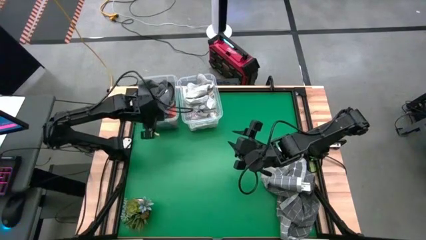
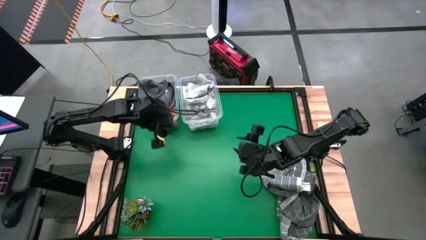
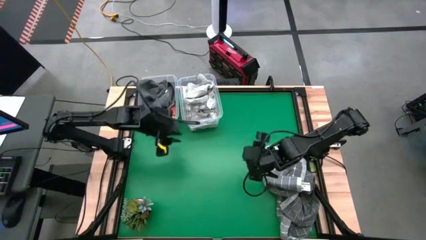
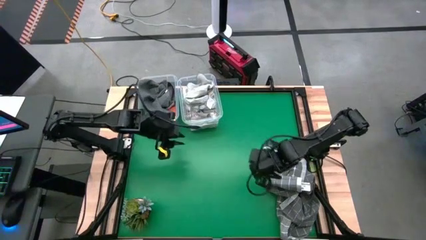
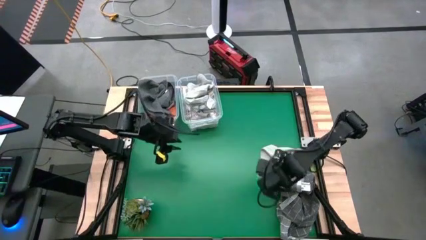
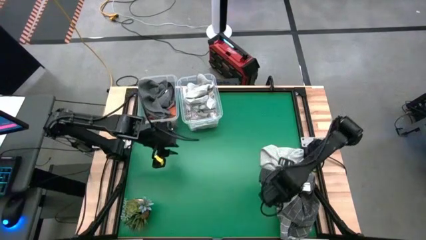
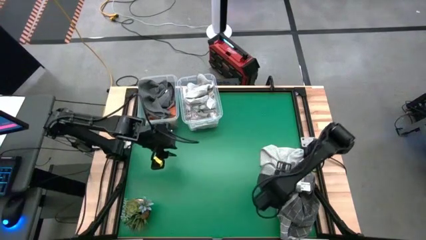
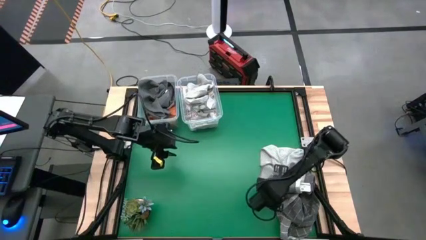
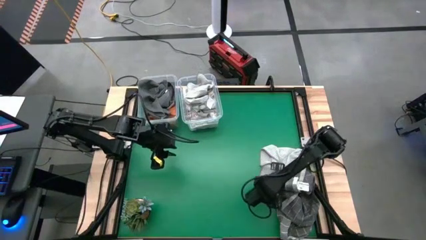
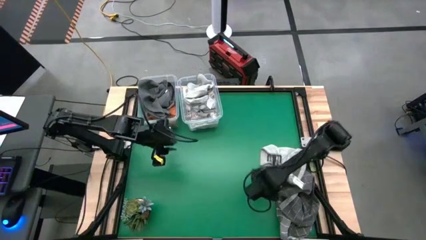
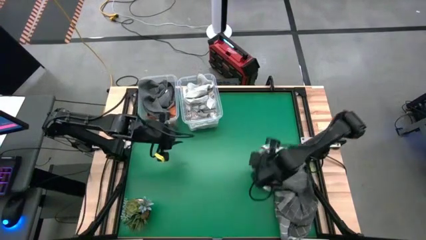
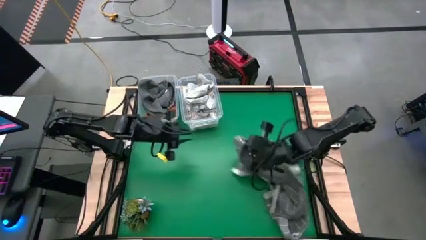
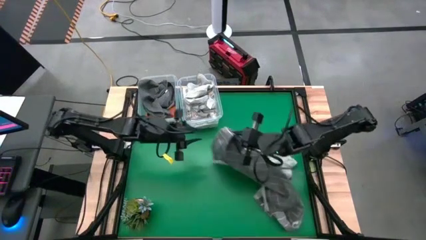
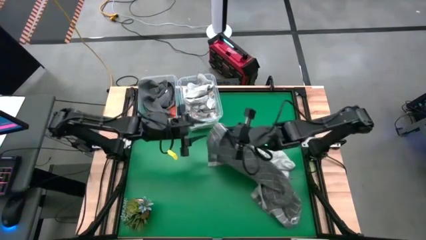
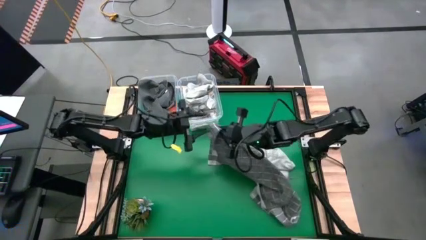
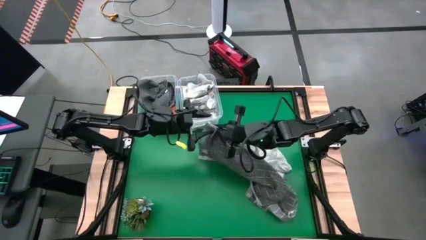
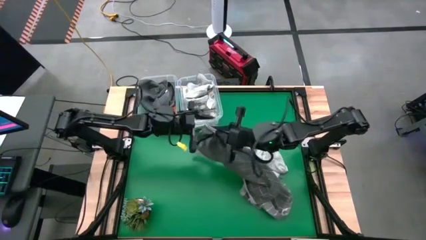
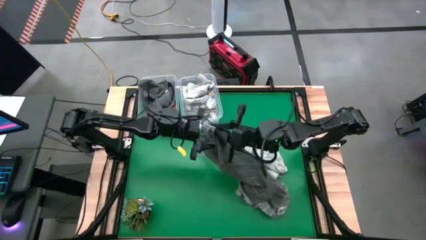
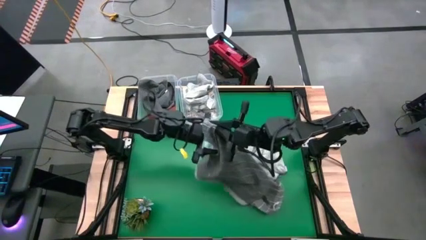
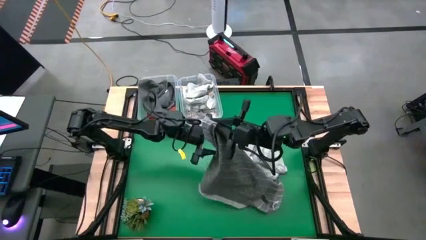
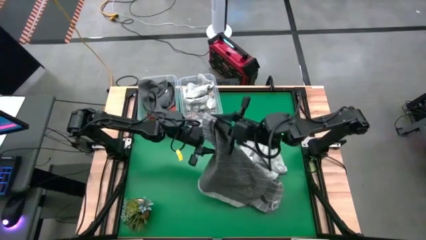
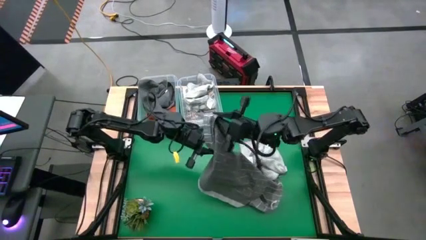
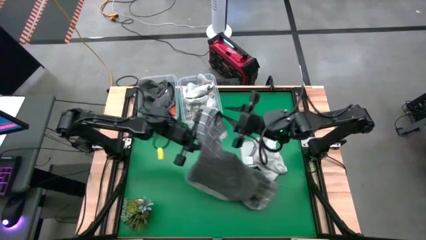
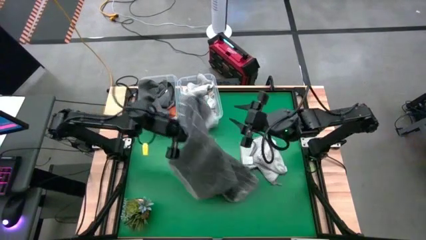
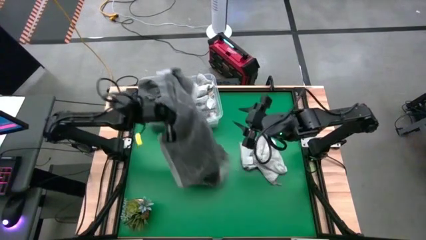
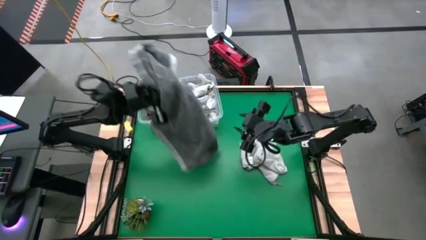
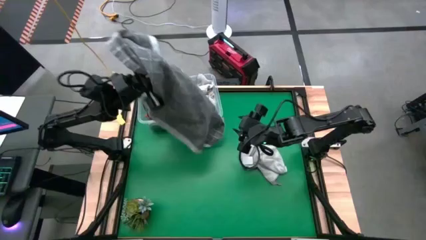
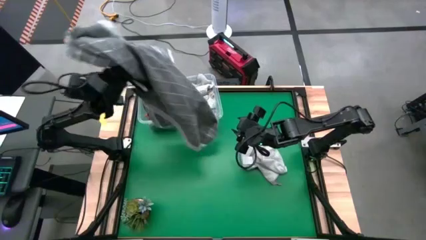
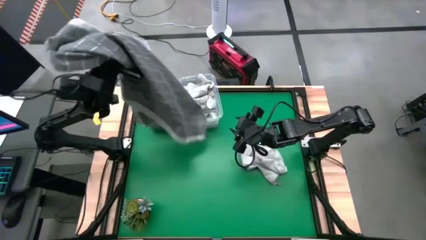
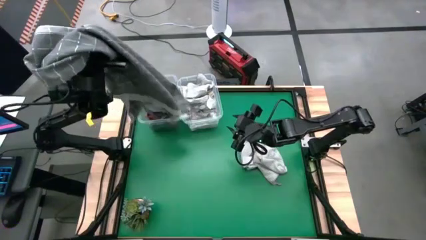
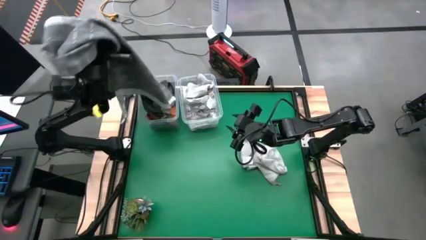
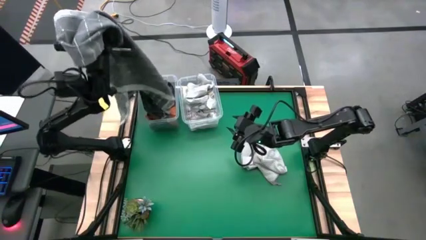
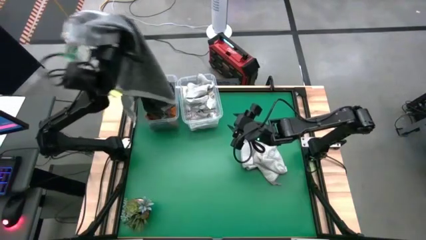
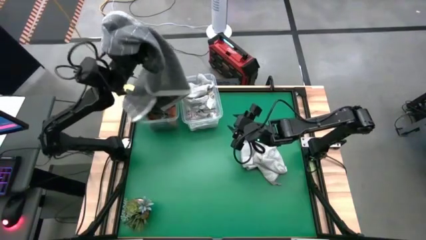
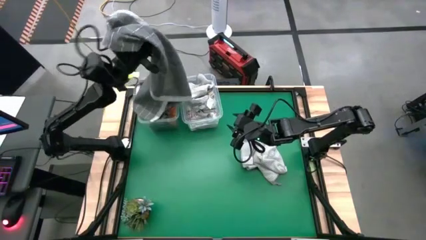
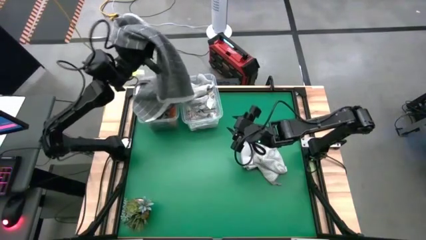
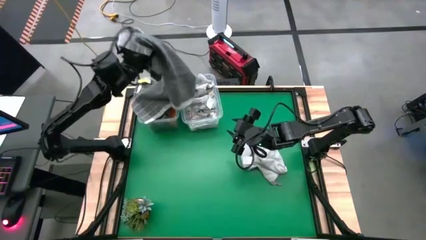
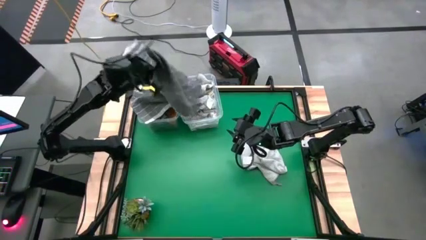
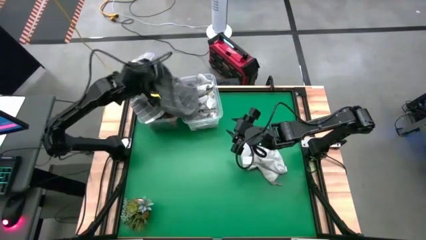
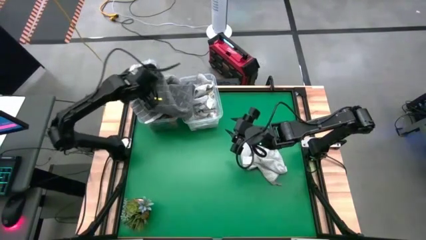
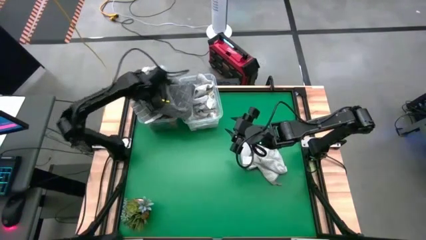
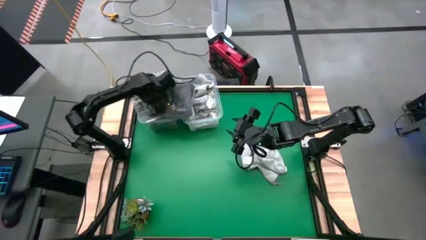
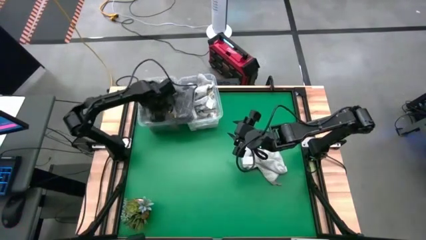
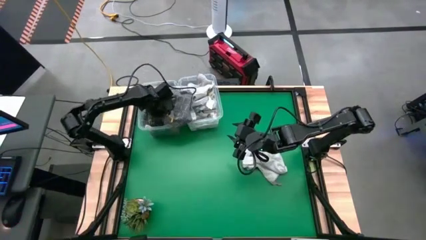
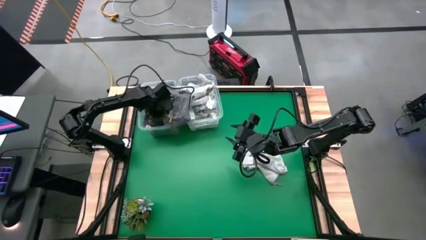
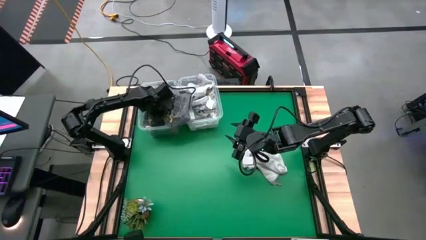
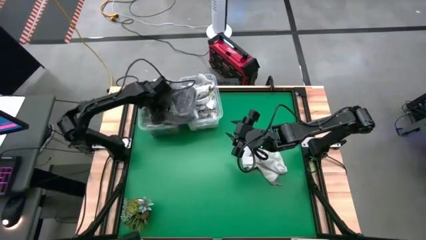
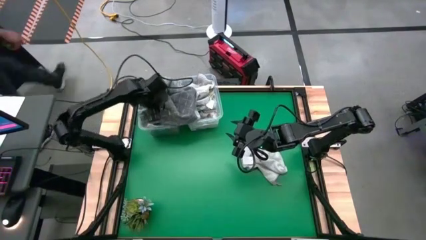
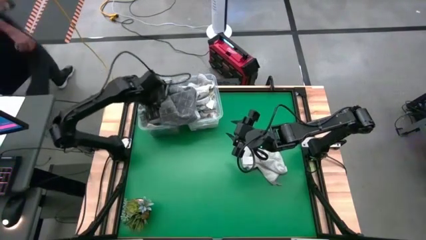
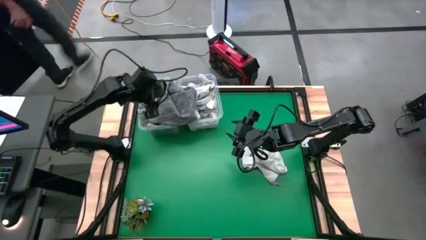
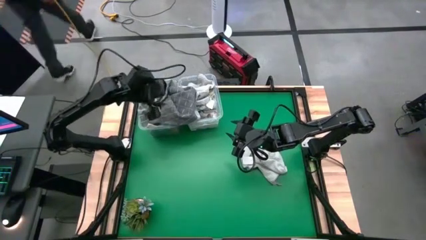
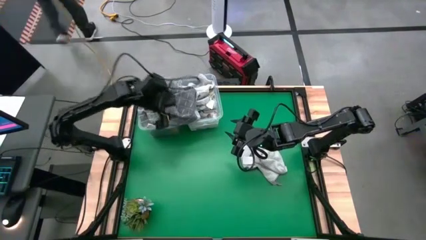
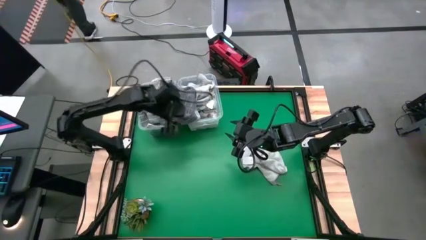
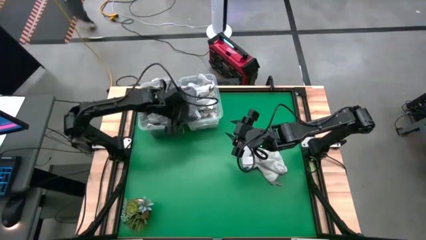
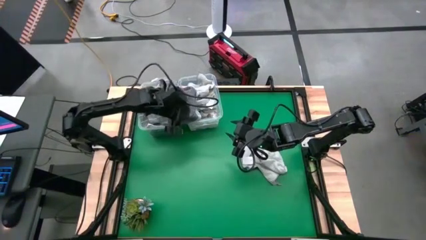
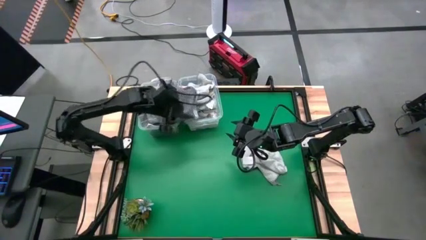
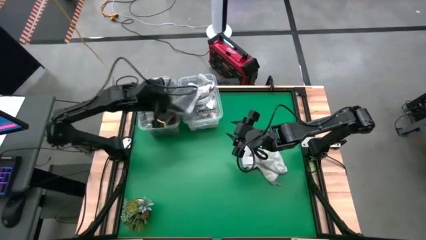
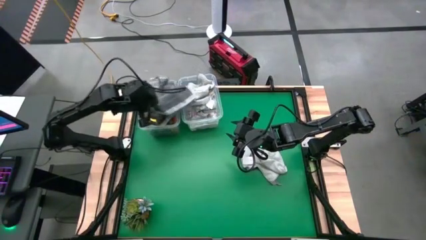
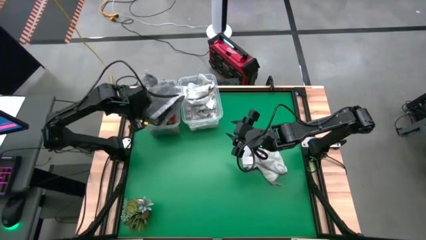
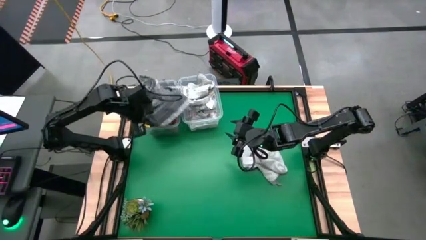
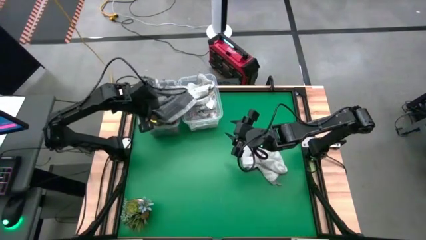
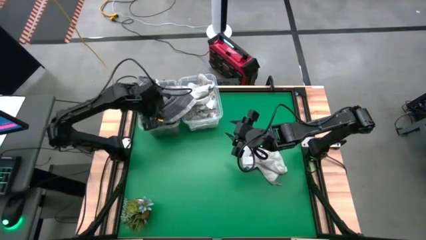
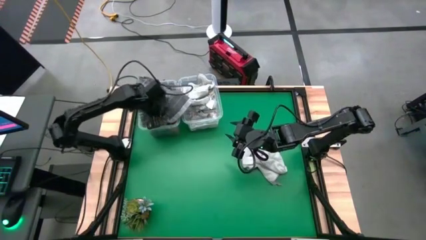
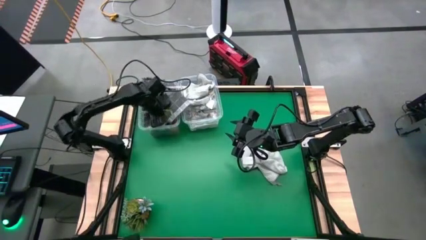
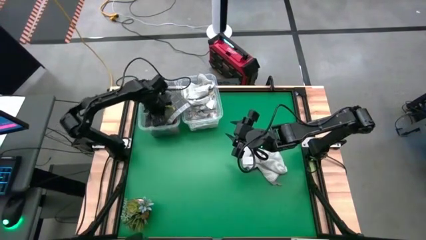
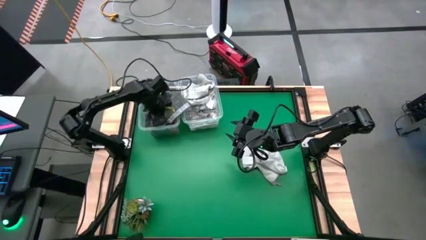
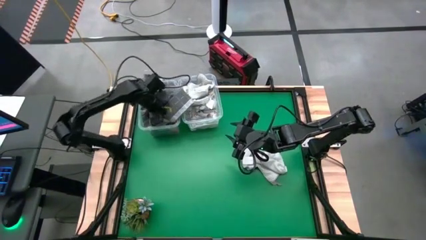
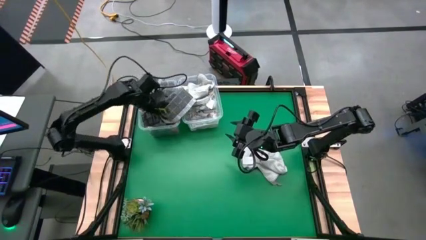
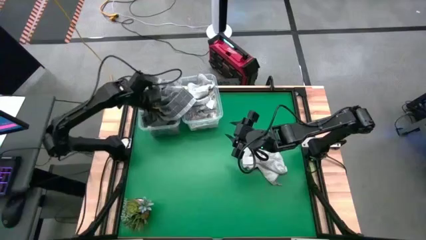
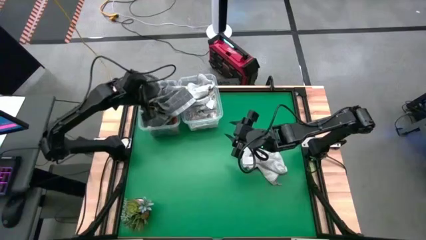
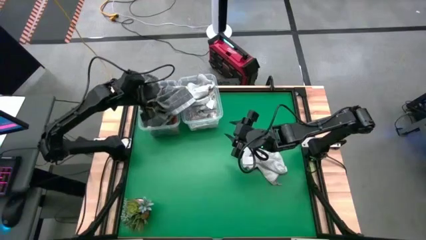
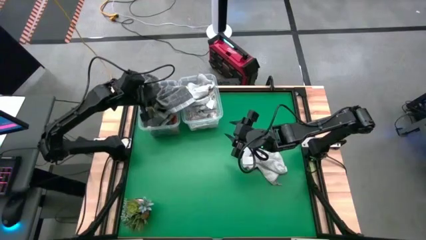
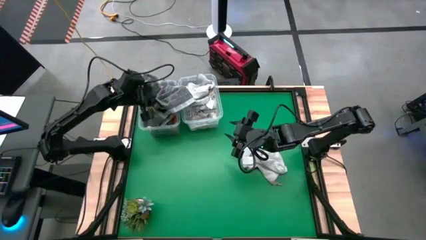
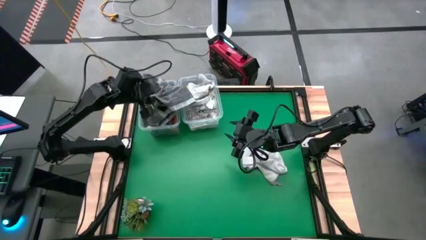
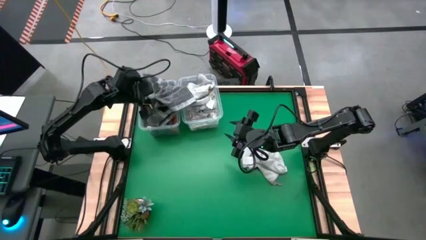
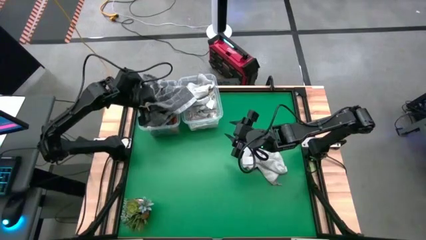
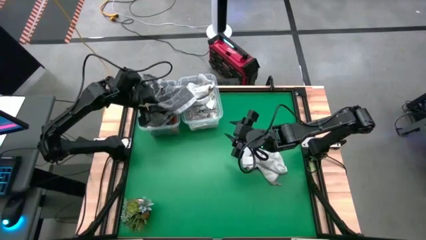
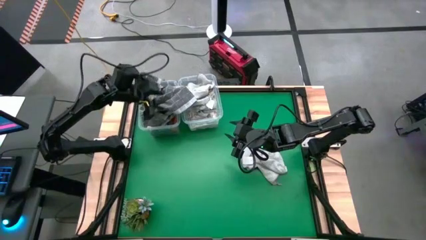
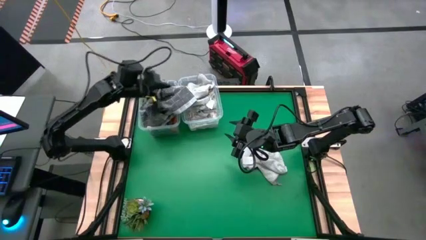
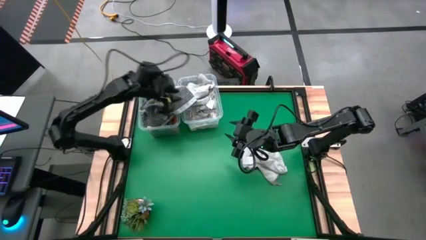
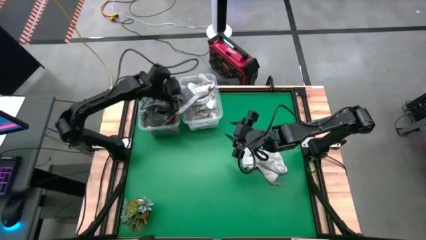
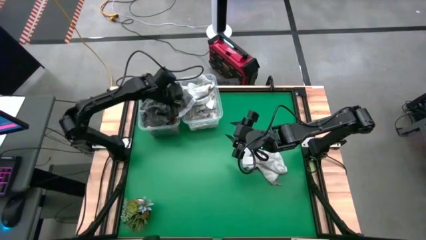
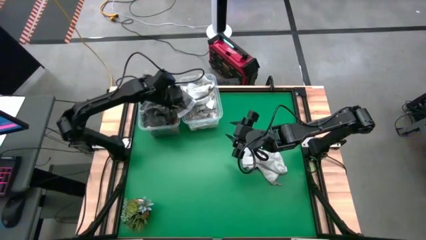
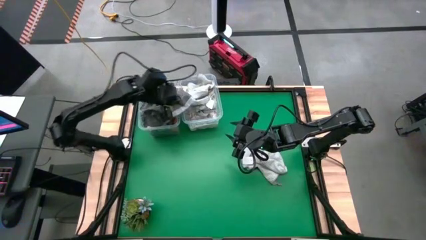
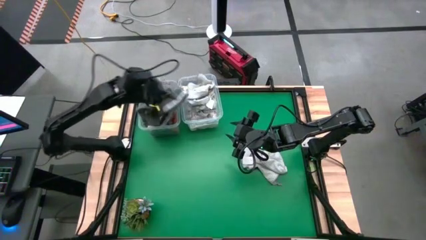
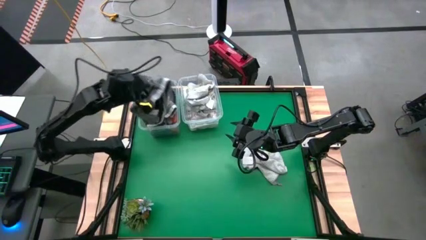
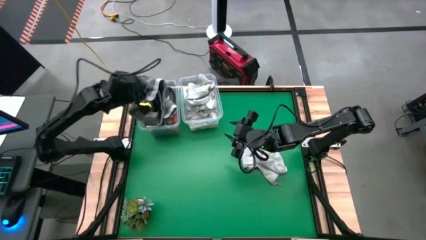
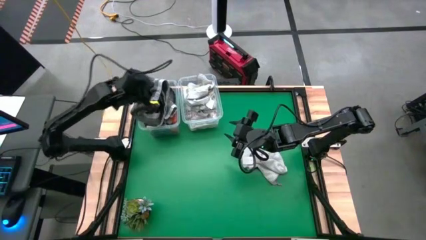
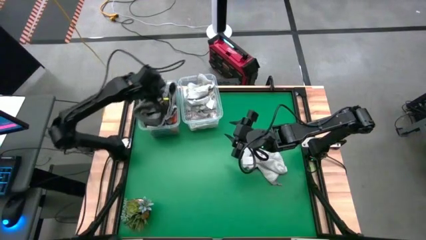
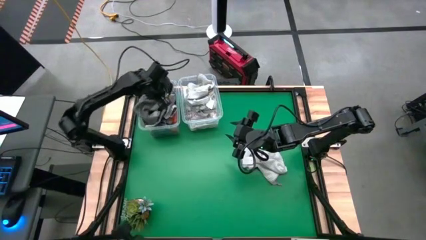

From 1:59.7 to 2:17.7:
Task: Sort towels by color in basket
Put the gray towel into the left transparent bin
